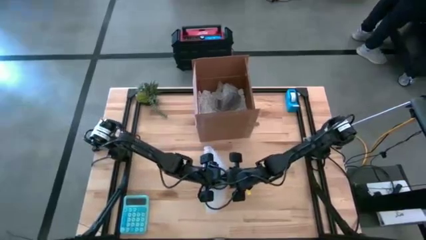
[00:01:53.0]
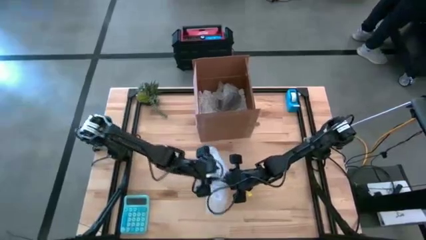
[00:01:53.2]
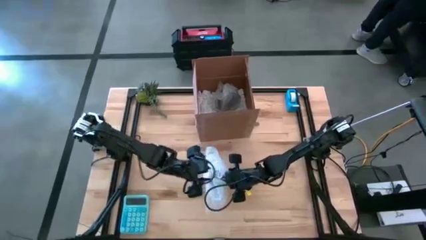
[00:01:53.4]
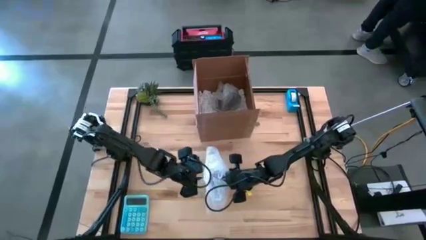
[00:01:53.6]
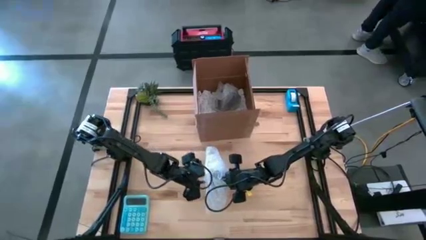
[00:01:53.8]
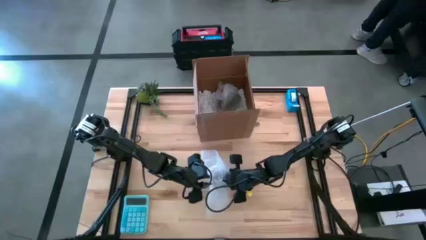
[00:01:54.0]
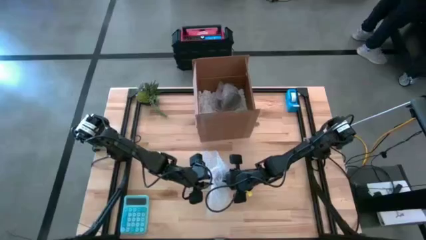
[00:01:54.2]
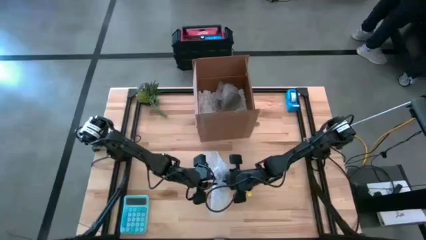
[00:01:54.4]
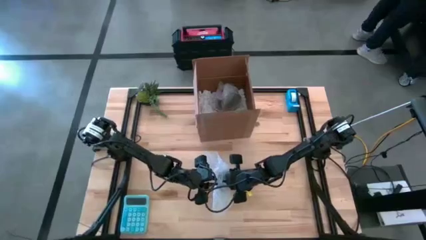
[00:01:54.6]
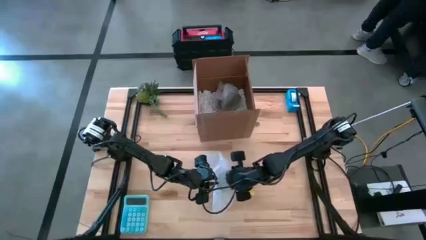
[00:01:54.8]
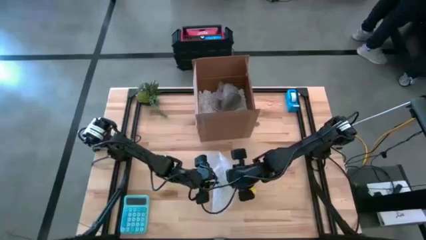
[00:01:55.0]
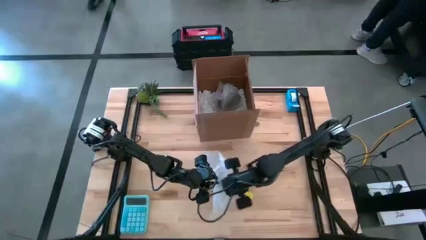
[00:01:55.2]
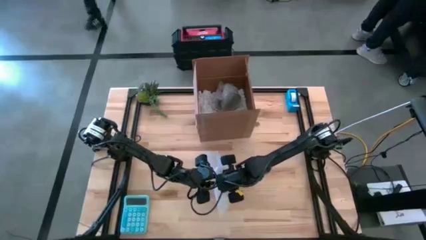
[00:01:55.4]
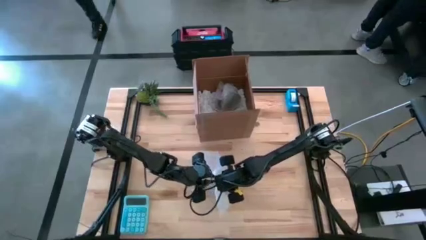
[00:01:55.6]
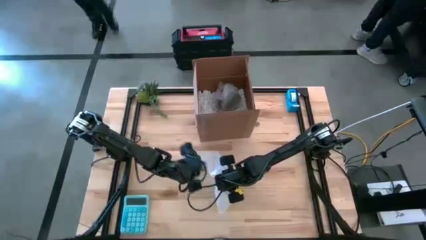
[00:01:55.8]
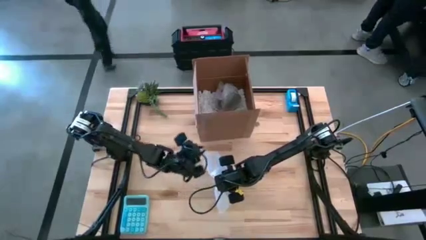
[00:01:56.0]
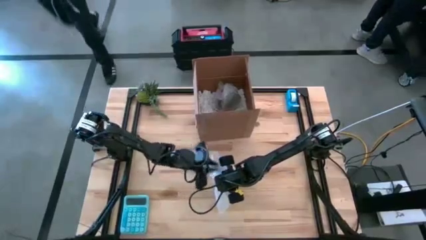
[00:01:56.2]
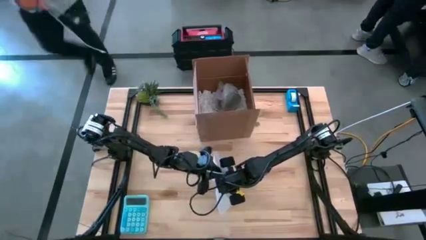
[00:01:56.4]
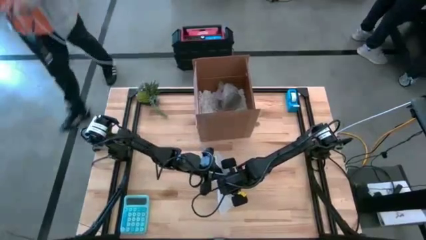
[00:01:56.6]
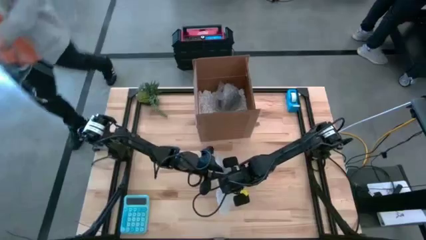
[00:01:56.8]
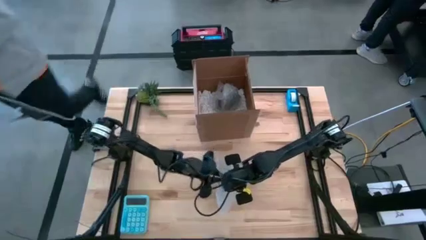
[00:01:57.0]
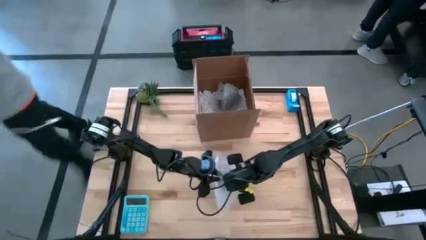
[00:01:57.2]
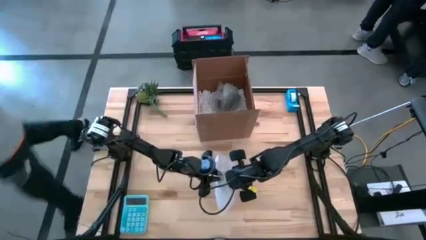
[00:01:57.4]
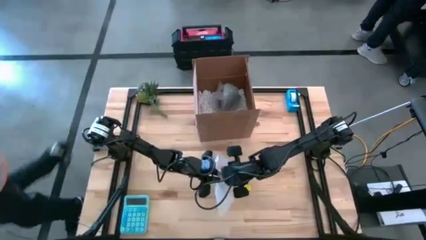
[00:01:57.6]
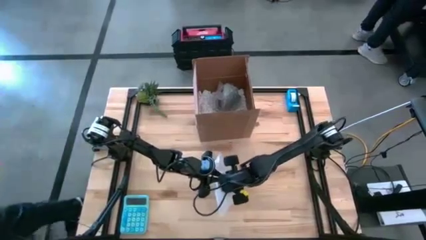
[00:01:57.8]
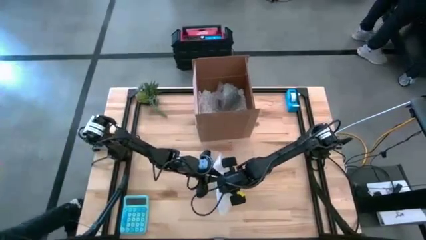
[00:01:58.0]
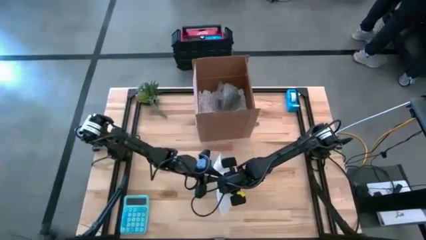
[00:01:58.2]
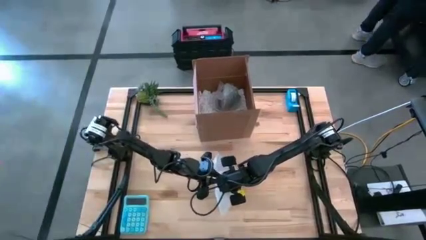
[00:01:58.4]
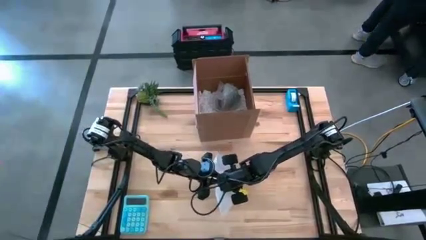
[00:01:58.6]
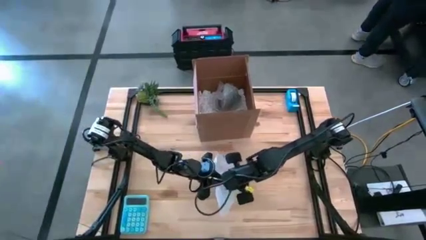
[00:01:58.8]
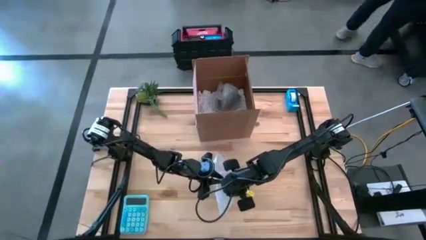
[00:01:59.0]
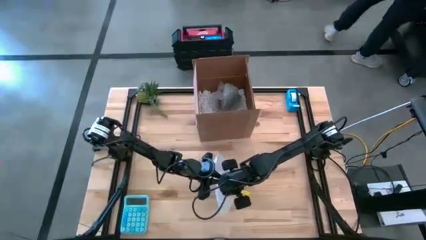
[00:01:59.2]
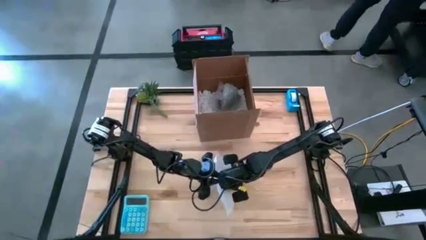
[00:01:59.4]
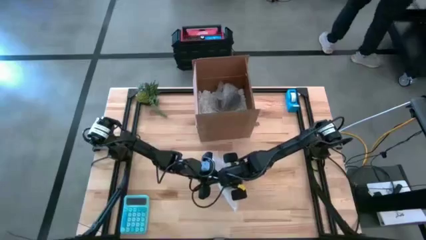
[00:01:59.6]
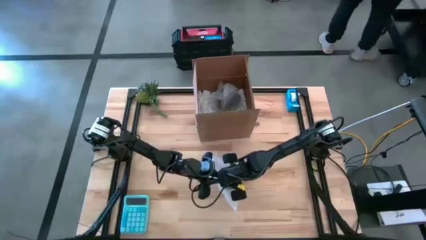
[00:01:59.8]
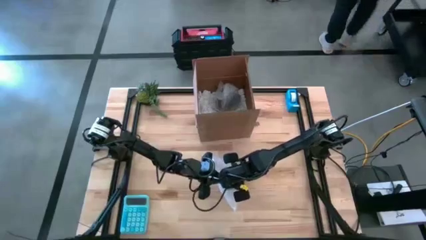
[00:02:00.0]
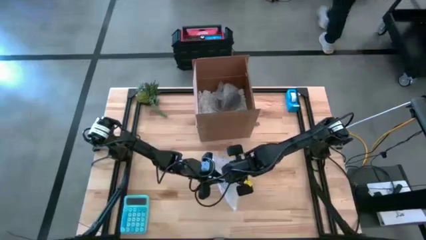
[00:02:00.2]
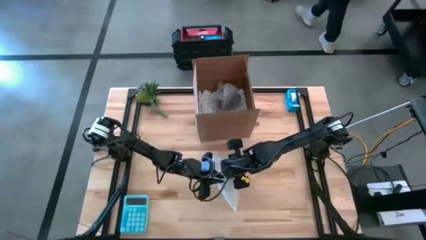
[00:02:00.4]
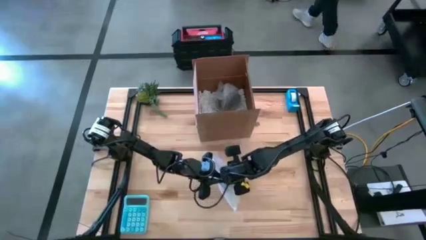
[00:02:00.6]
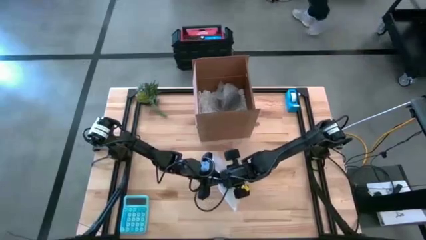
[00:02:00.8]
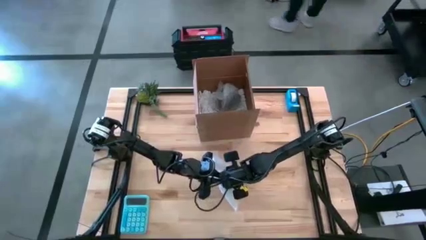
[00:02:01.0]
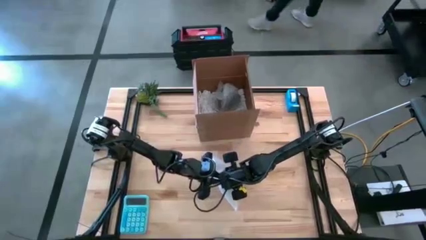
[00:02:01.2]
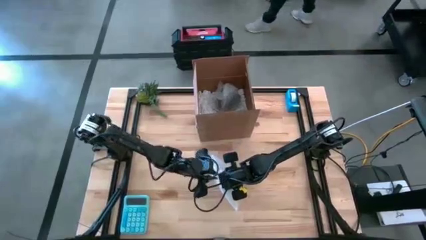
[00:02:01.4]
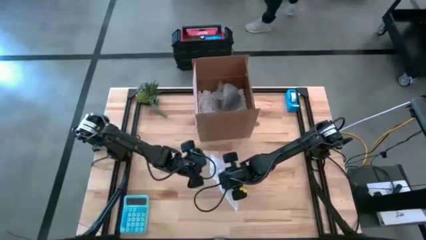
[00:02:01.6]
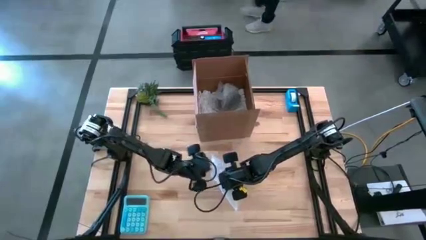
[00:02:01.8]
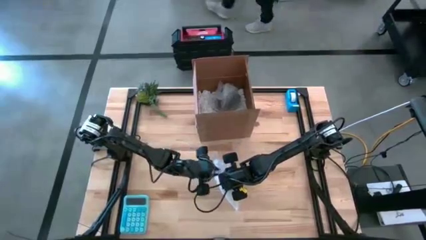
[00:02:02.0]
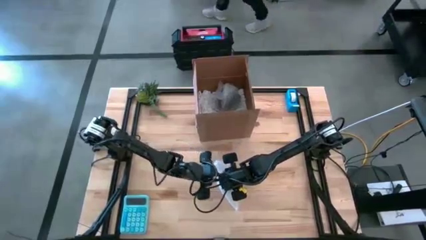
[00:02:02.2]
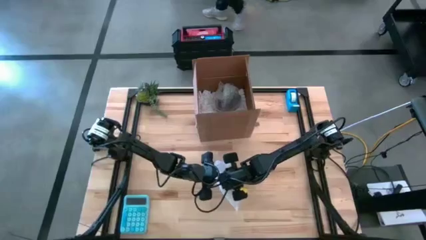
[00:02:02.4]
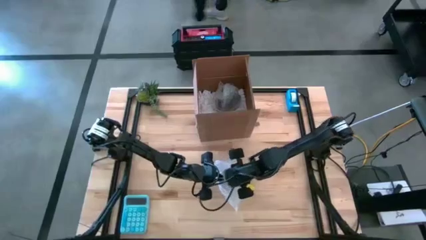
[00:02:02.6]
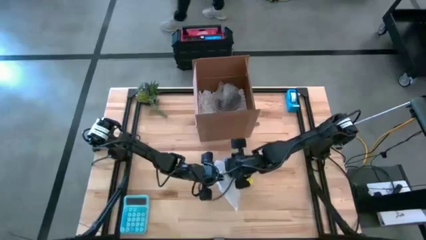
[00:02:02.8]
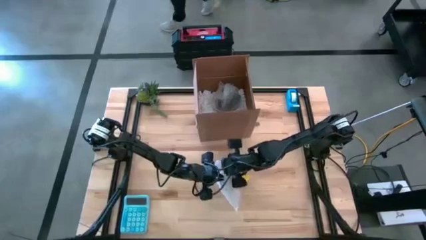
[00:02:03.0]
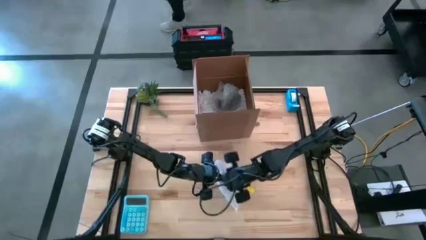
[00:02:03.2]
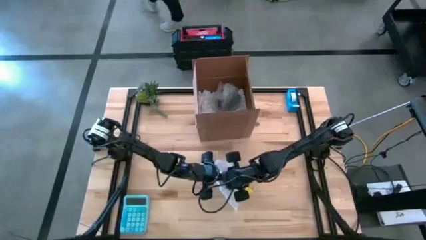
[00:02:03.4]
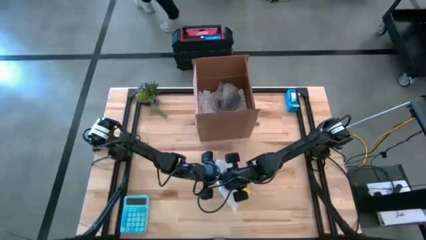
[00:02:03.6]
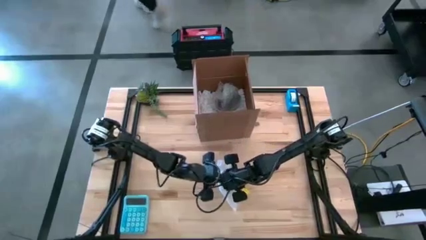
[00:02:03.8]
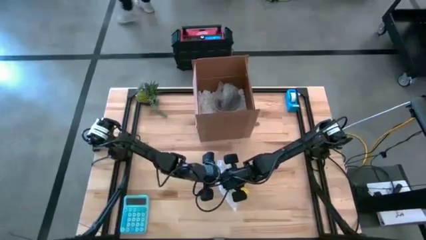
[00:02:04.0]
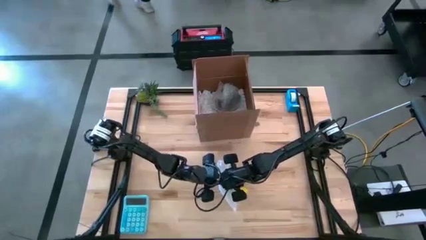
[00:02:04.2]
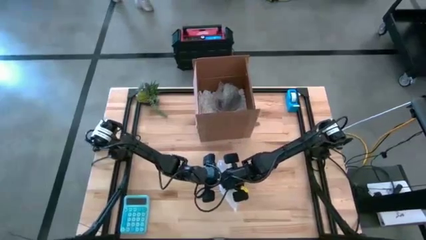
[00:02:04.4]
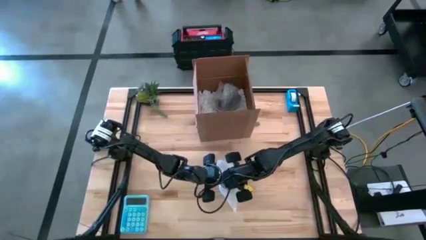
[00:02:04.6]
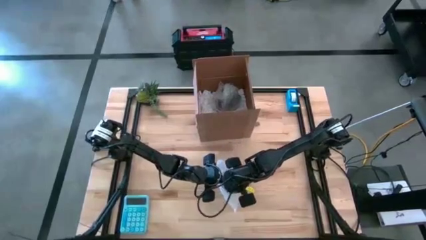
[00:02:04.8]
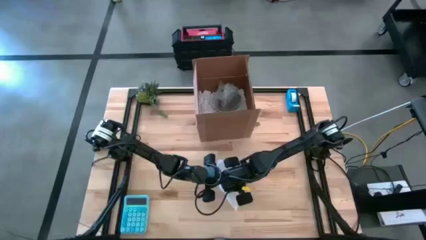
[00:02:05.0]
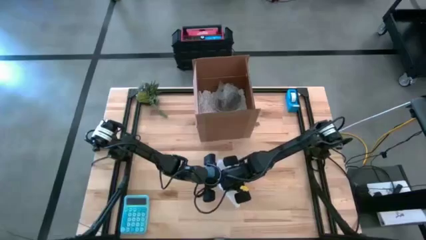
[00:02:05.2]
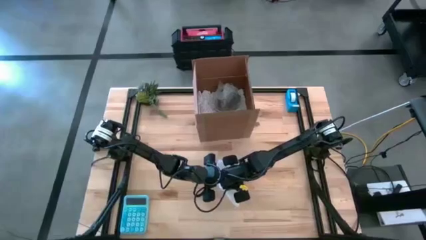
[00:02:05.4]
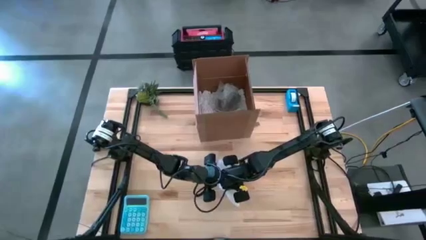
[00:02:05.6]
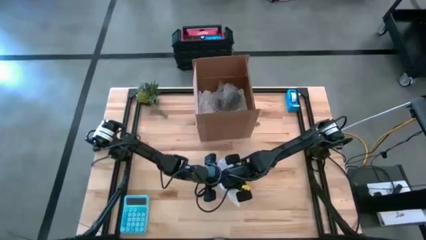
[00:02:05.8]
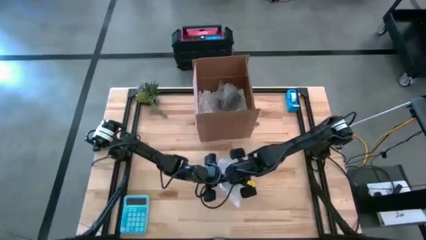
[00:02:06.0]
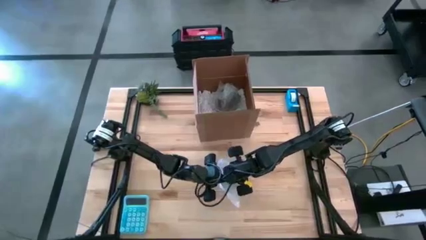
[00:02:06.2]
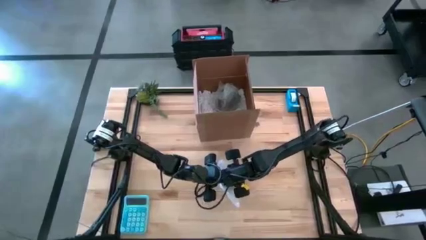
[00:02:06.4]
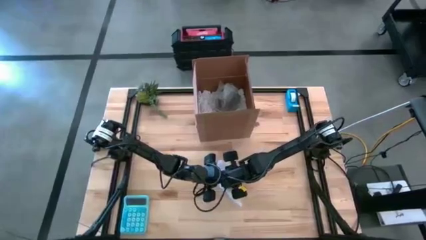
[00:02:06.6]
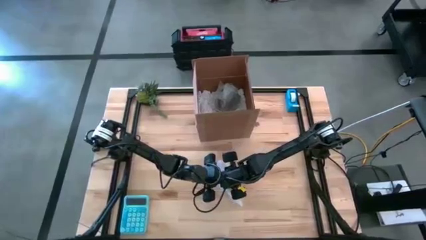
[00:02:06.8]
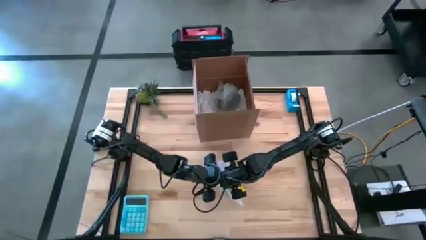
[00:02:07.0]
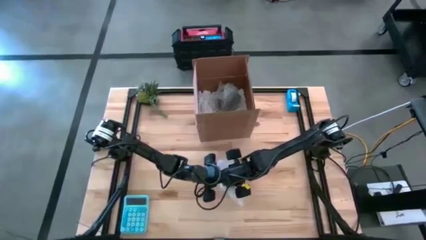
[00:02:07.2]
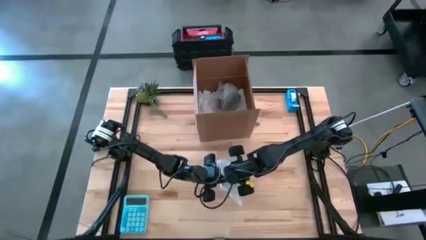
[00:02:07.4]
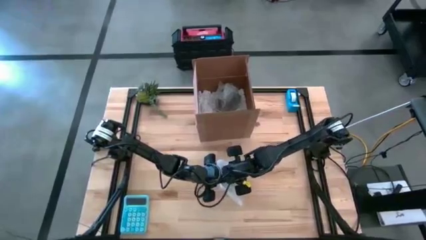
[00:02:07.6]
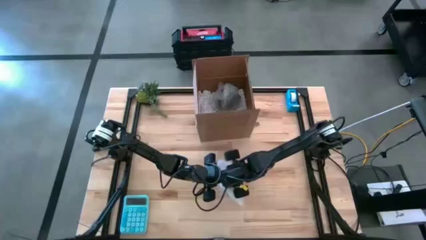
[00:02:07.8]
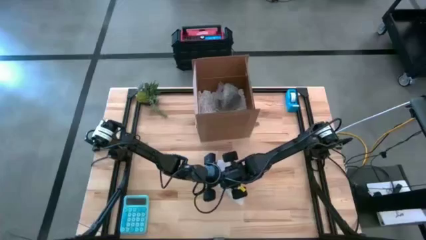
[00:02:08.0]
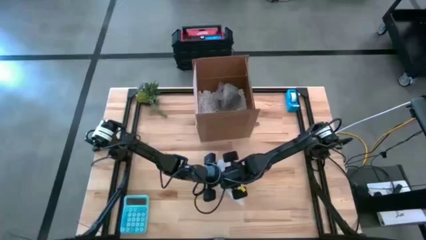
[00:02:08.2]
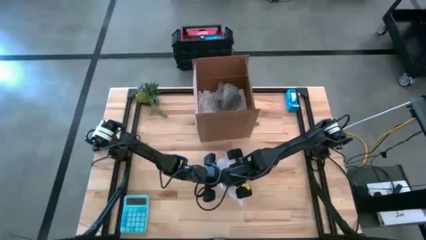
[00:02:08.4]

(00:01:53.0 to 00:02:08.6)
Task: wrap mug
Wrap the white mug with the bubble wrap

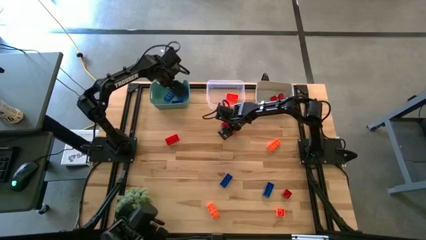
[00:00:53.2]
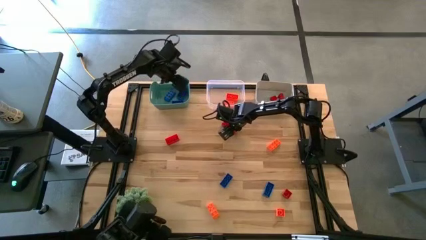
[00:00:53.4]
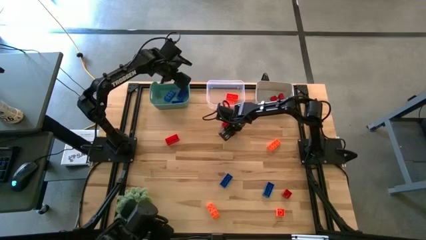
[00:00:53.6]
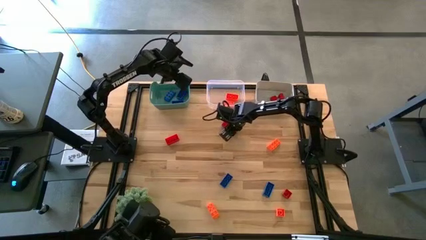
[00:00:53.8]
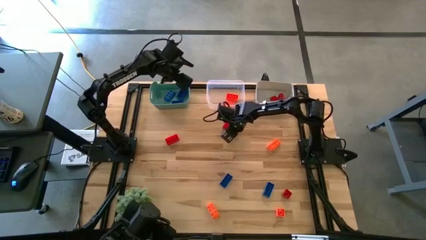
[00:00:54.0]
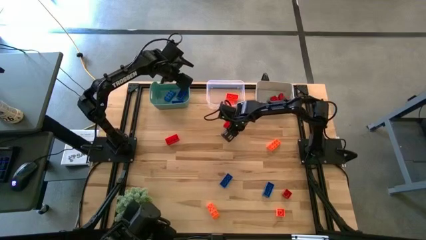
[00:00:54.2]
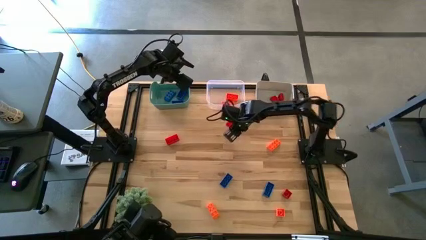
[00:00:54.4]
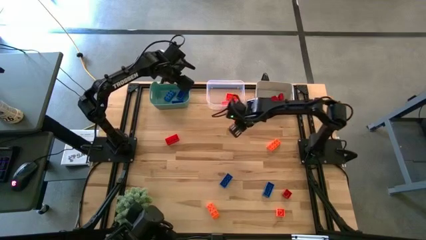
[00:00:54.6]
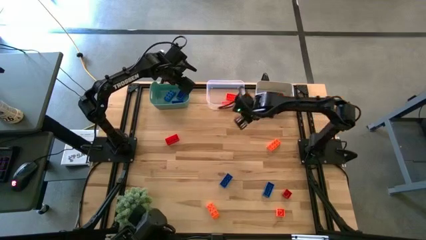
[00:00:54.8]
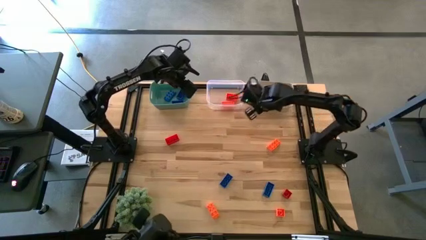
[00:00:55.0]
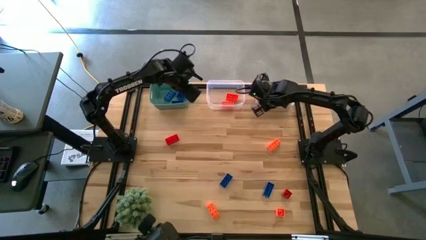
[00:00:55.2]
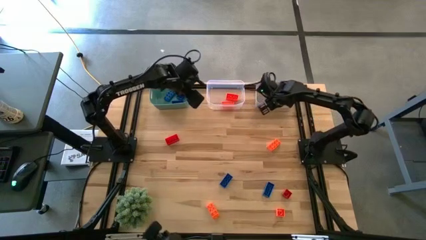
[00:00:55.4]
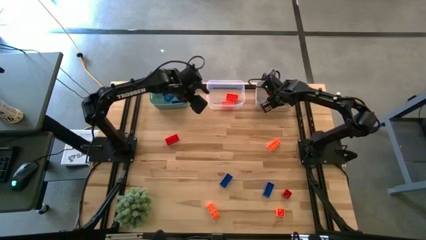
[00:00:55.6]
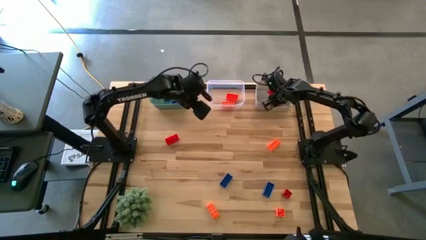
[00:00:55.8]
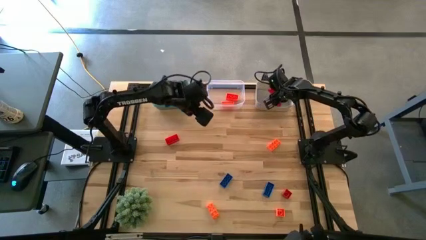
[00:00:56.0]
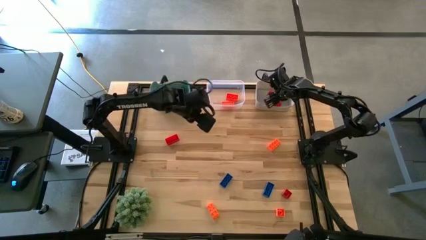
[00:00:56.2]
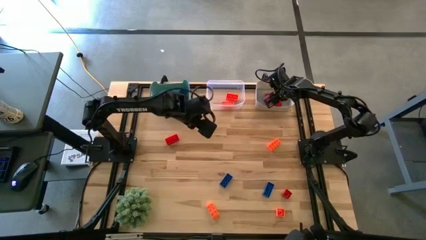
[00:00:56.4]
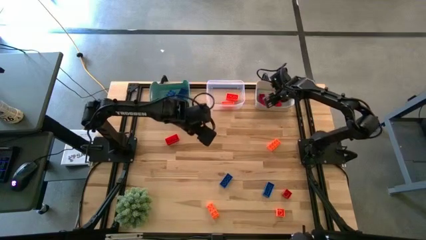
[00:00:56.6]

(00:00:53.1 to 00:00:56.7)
Task: Sort & place blocks by color
Put the red game piece into the gray bin
